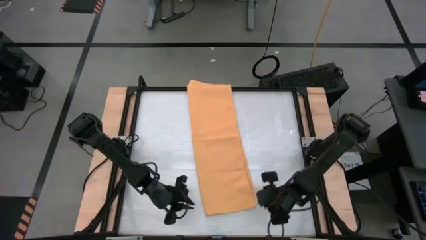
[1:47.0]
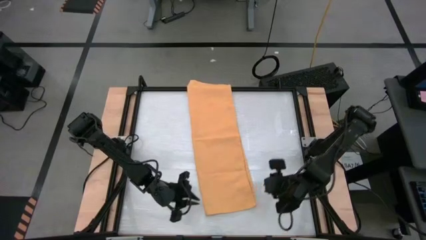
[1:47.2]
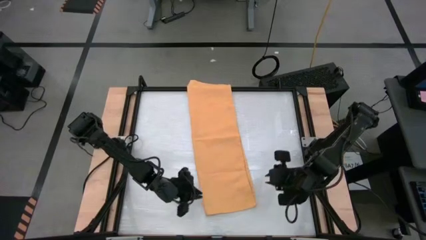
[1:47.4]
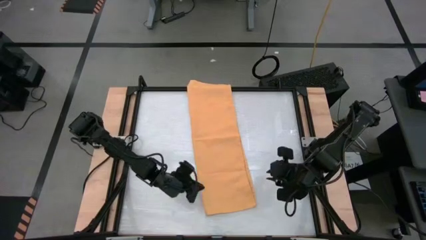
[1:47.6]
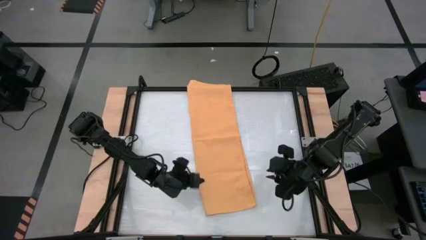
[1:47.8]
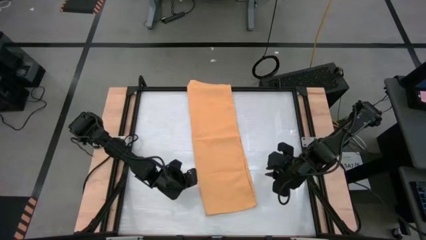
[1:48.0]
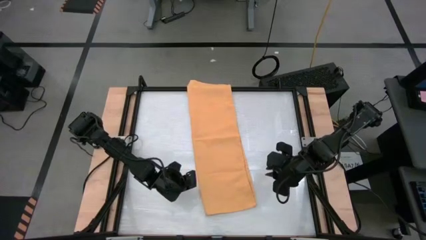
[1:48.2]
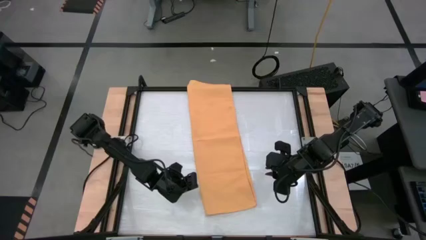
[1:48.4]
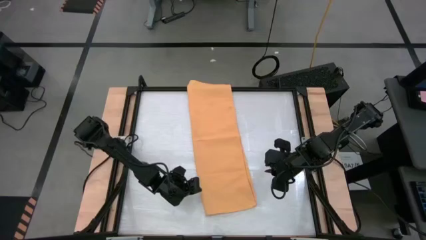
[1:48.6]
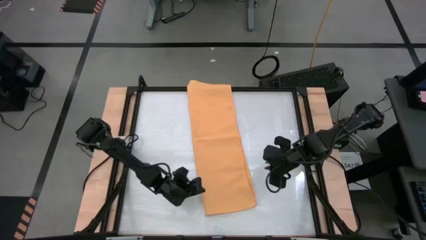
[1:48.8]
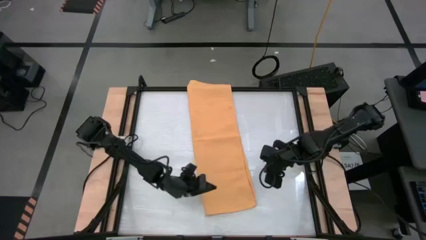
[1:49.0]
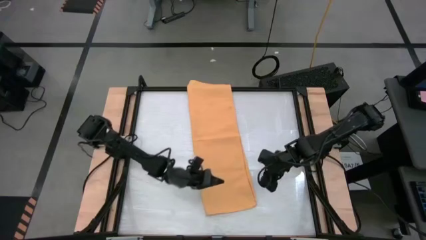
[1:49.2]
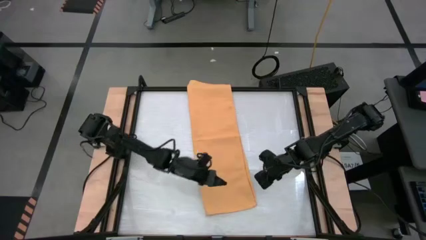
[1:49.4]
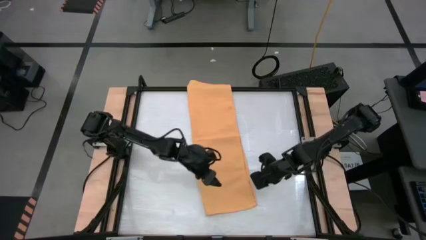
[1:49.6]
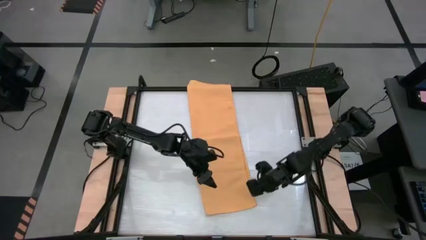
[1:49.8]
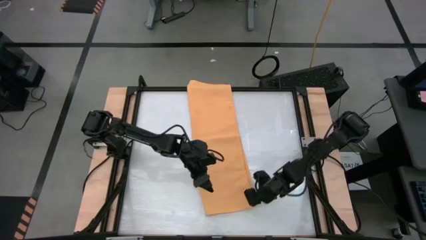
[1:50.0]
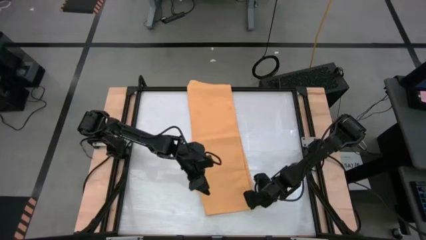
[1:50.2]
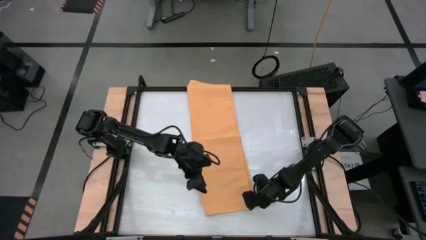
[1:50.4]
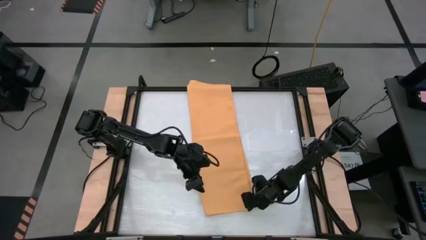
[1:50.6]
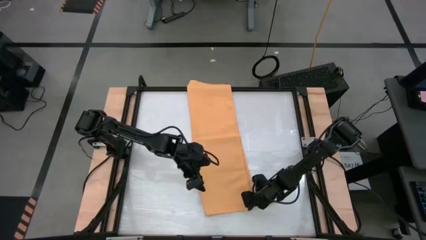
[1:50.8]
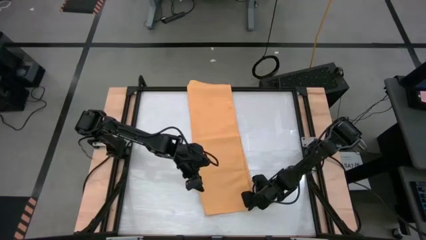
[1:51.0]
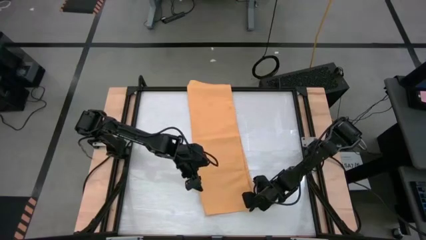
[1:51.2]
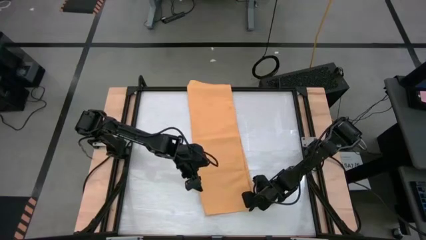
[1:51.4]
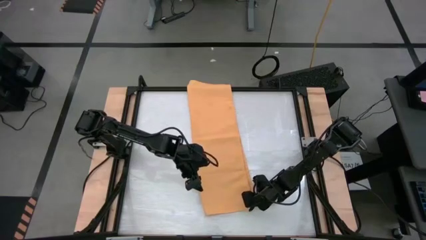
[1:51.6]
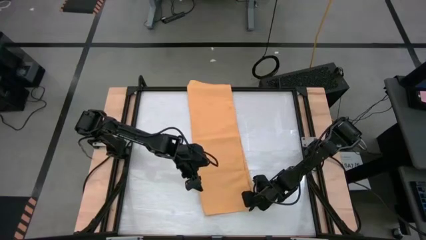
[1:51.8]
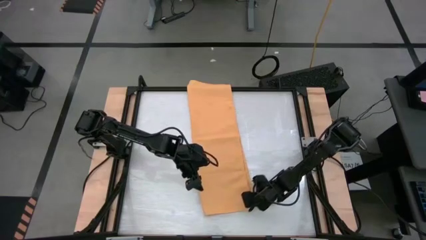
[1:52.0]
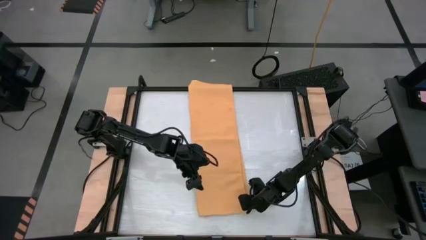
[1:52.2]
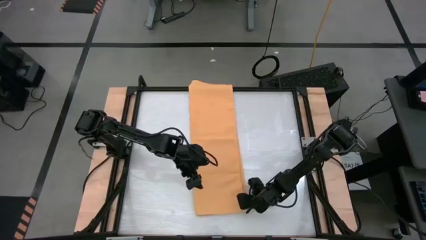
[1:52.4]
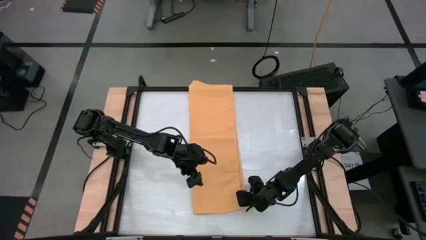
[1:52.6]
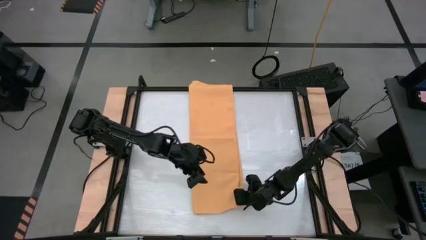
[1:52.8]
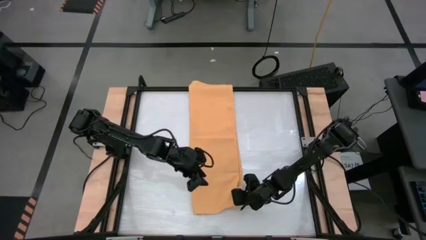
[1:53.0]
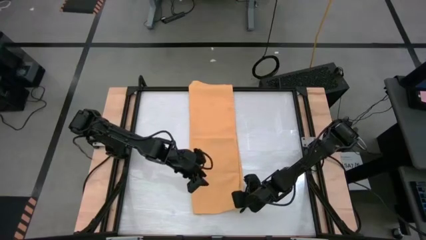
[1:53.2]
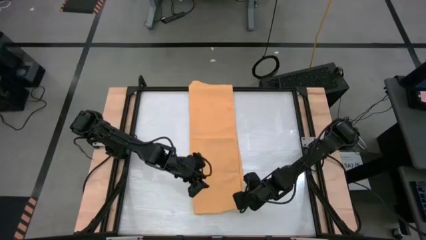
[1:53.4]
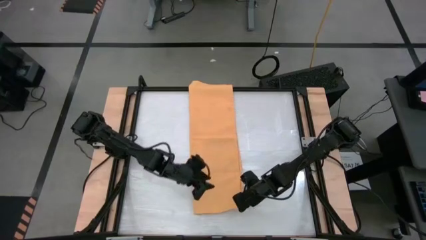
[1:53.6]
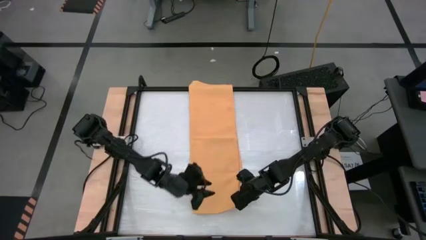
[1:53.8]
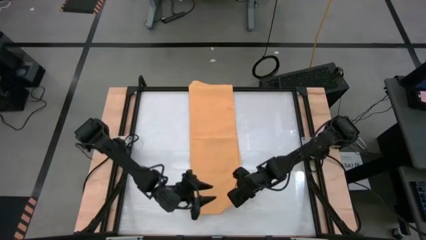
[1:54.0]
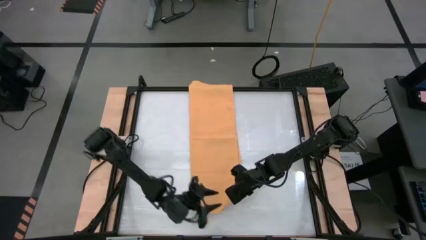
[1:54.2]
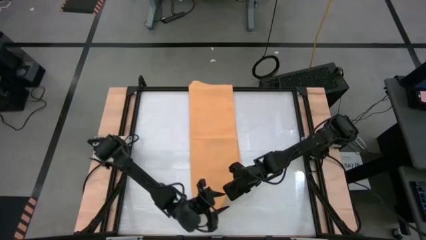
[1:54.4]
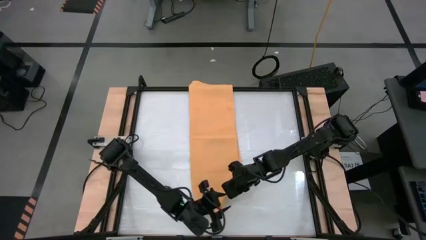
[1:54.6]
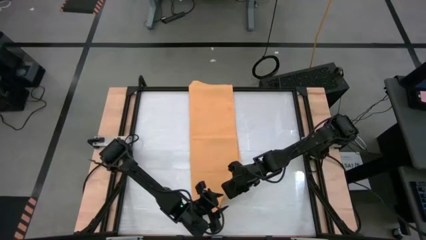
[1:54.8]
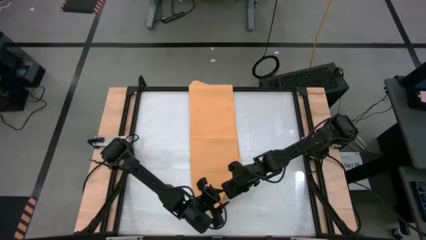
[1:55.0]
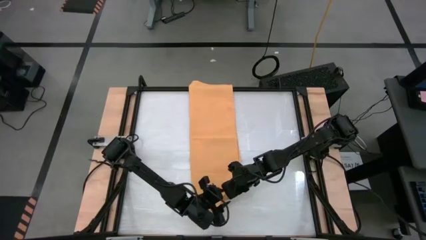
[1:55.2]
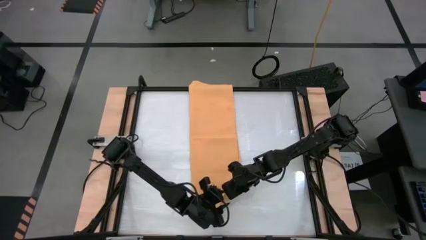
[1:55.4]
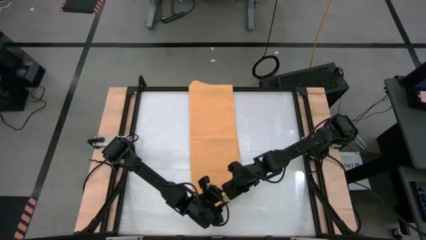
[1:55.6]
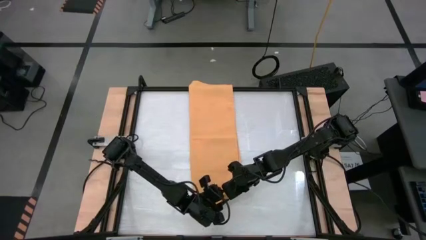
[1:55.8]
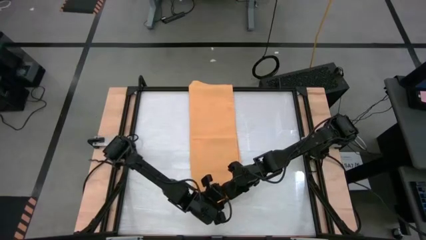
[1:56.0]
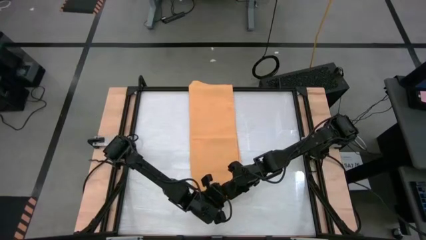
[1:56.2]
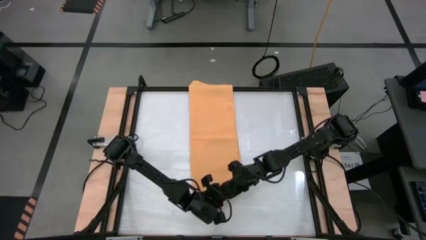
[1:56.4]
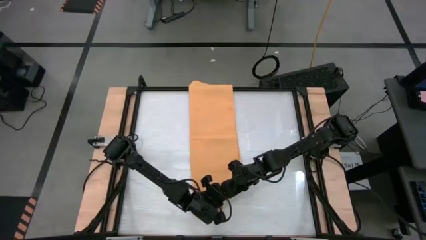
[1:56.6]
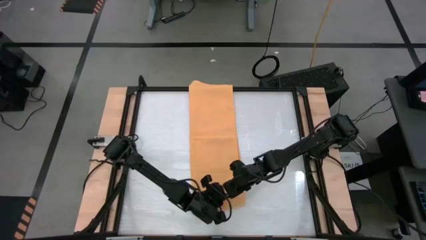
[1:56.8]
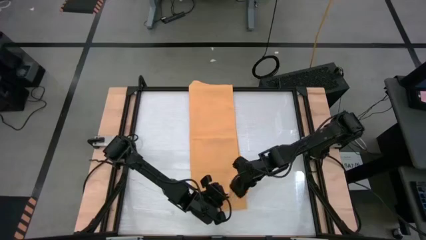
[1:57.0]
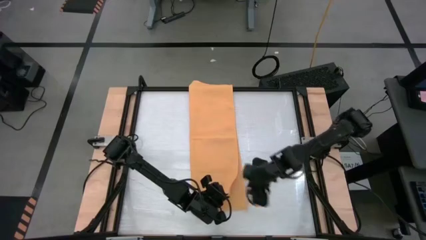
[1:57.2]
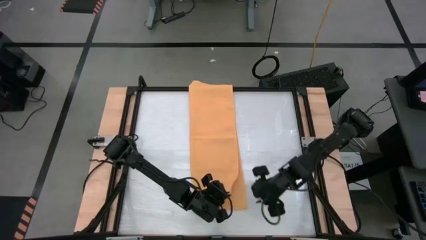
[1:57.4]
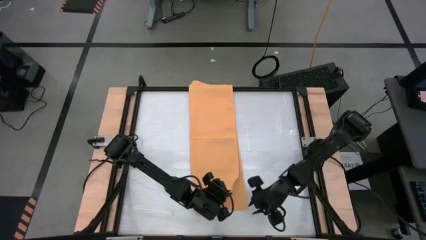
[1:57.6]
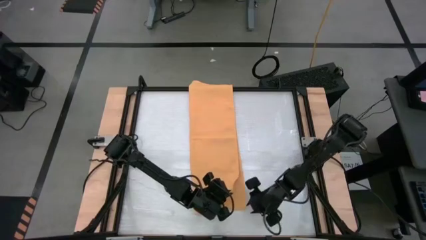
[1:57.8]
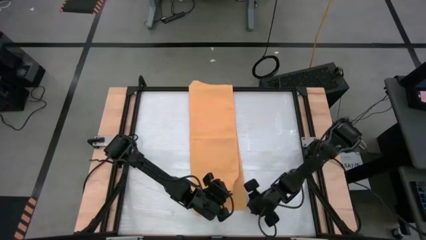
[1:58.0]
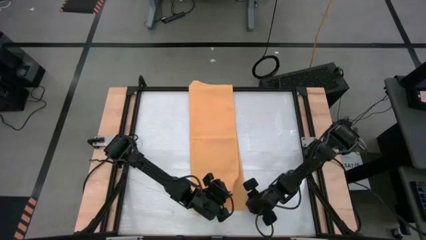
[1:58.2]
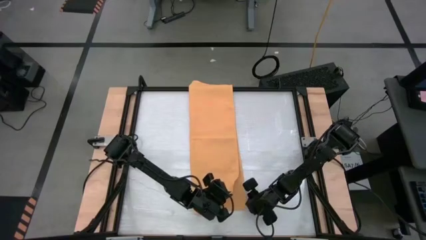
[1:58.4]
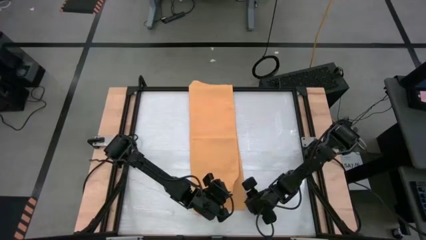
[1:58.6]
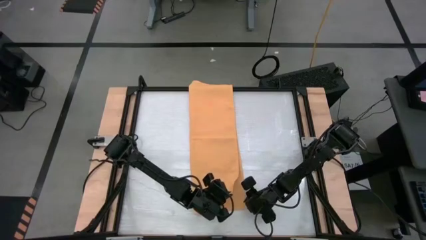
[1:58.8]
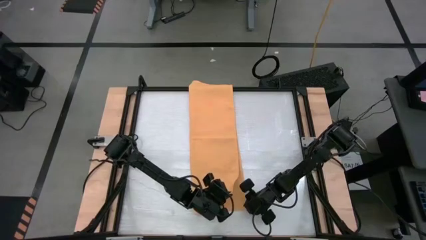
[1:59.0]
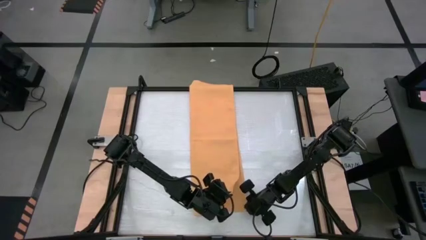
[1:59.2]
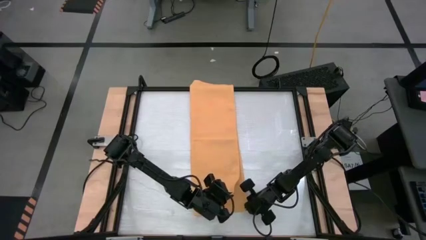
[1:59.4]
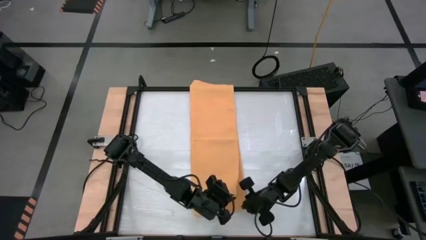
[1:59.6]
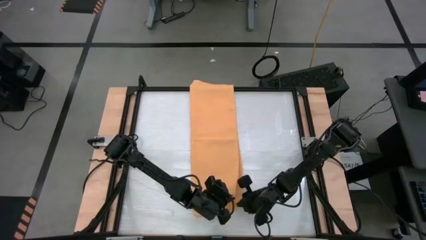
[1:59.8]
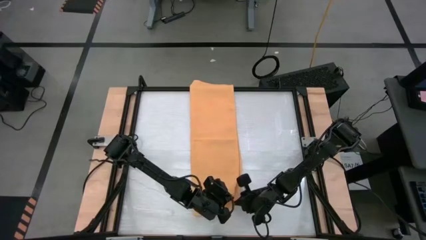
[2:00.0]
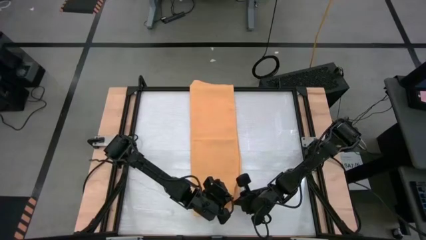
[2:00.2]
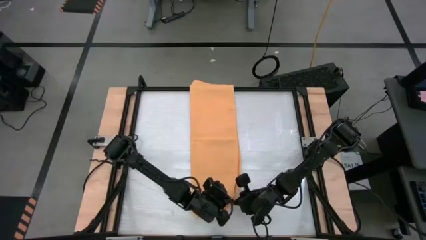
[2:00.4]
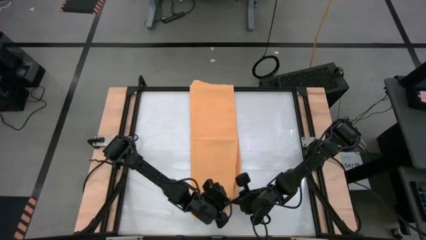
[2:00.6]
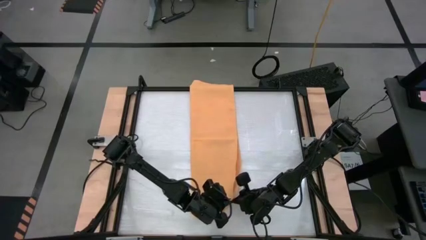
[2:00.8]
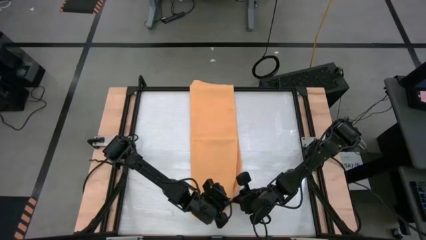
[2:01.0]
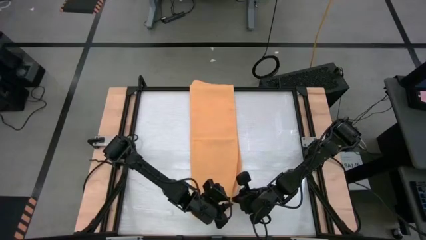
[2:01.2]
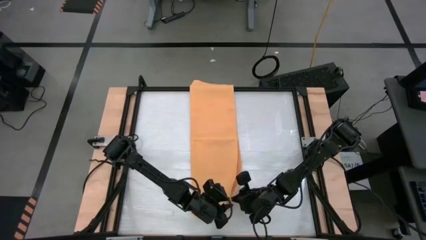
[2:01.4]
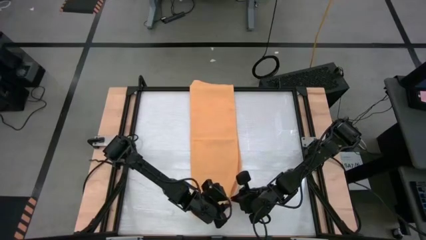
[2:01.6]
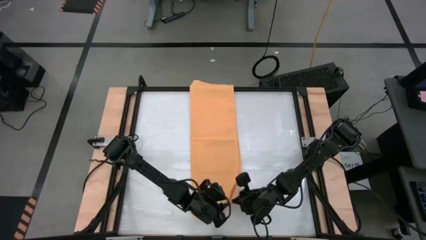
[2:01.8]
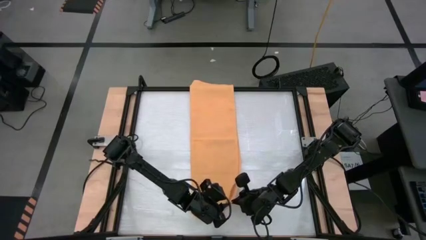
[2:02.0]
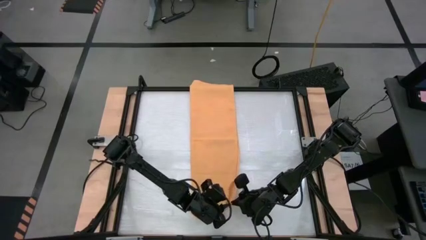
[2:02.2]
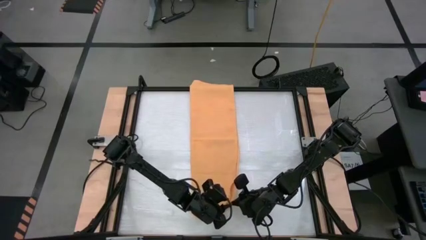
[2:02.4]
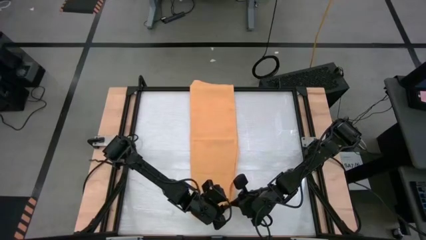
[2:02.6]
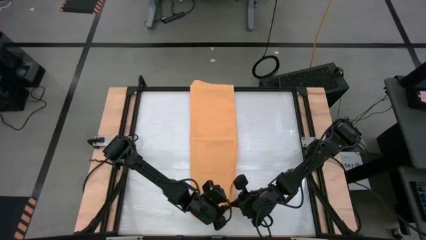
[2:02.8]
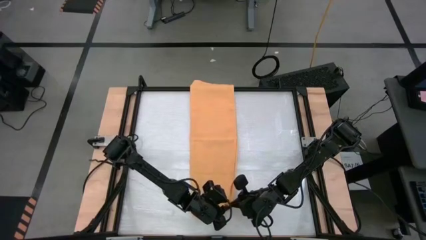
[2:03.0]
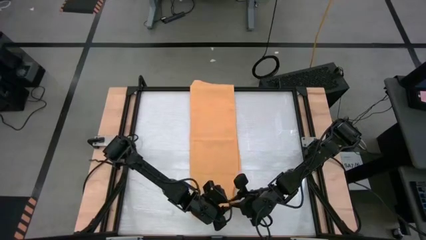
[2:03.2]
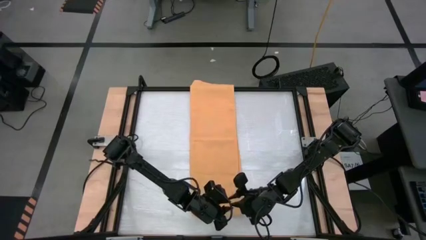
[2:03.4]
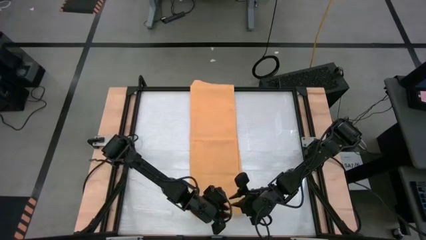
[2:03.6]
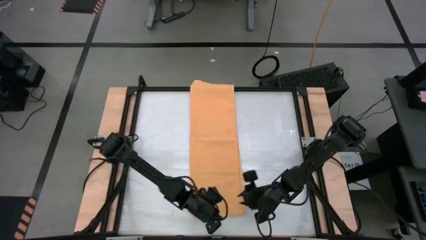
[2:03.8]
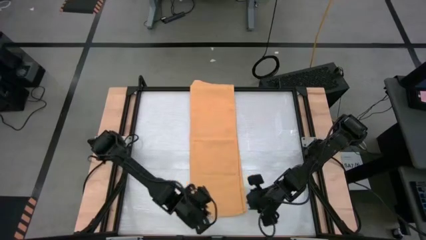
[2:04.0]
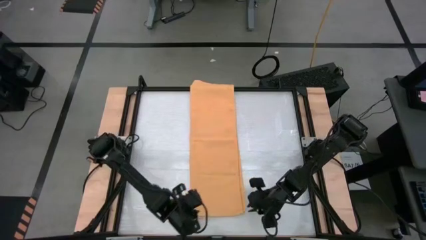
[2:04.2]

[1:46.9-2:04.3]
Task: Roll towel into tight, uniform cylinder
Roll the yellow towel
